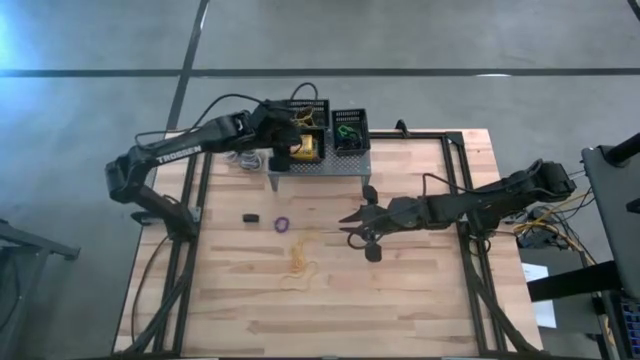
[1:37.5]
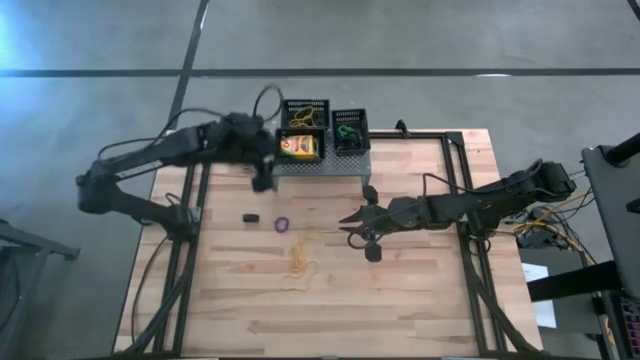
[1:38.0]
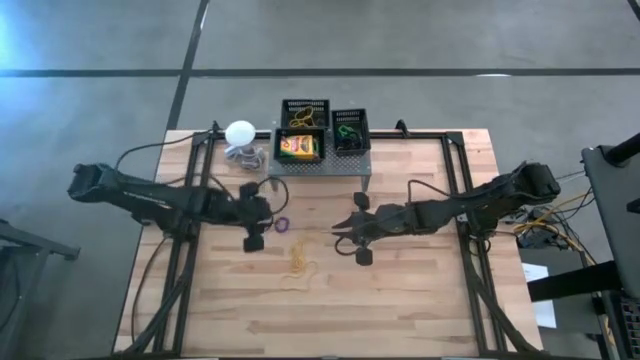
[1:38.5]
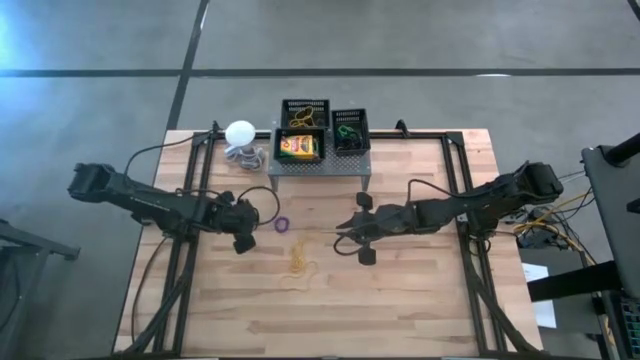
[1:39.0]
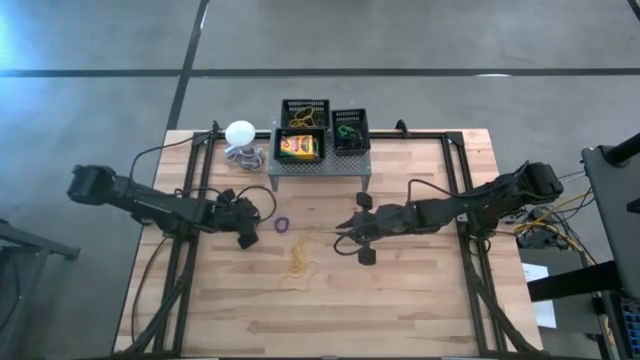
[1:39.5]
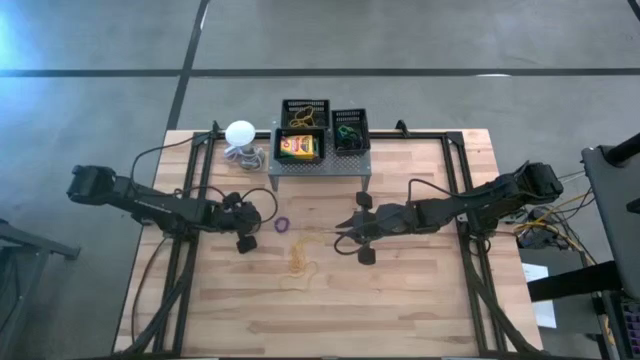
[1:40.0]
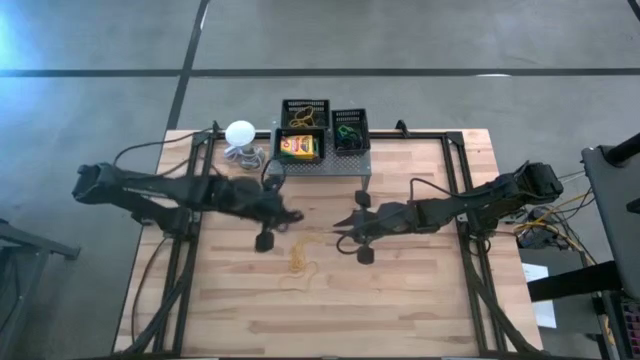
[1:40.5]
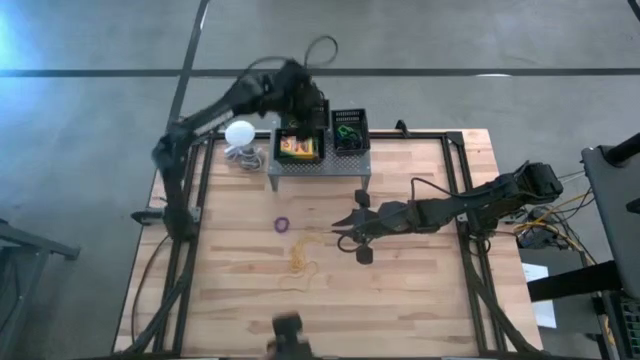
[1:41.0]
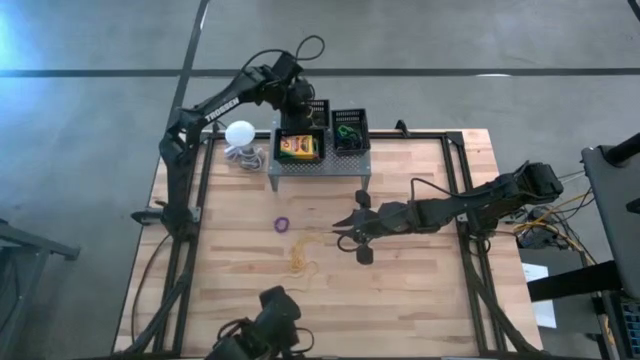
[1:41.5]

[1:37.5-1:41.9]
Task: Pick & Place Office Desk Supplies
Put the black rubber band into the top left black bin on the shelf

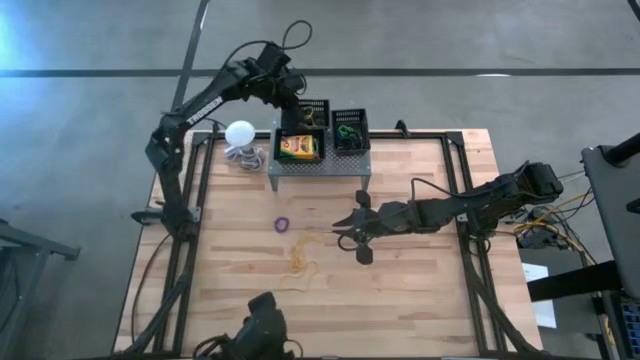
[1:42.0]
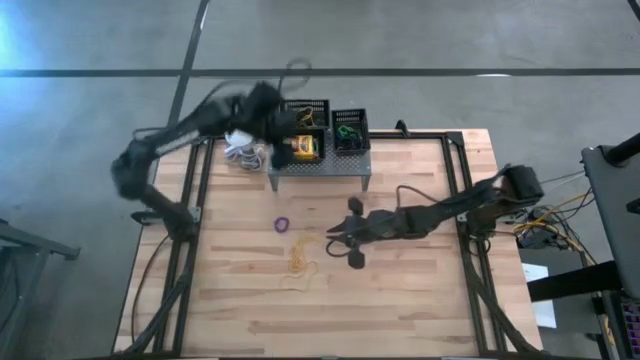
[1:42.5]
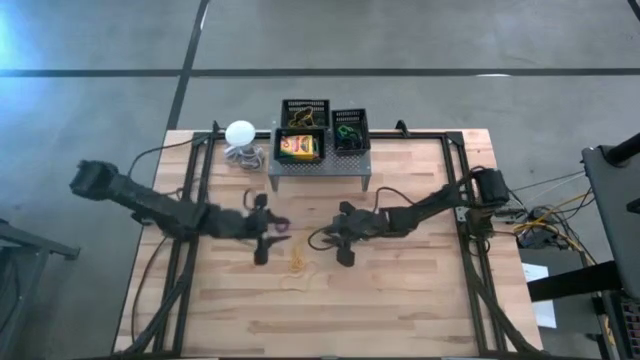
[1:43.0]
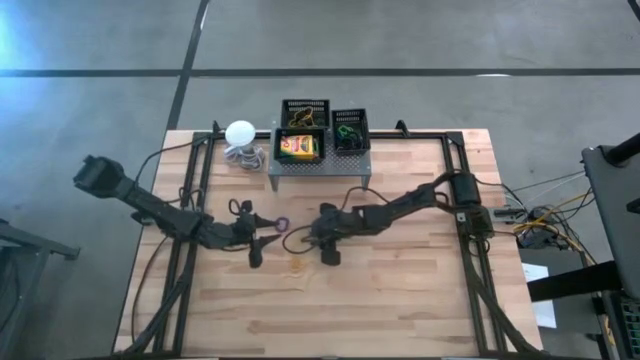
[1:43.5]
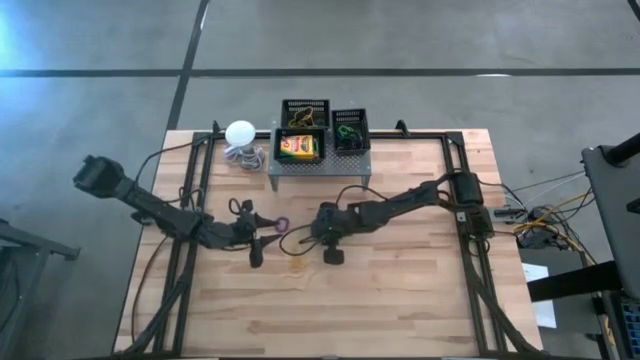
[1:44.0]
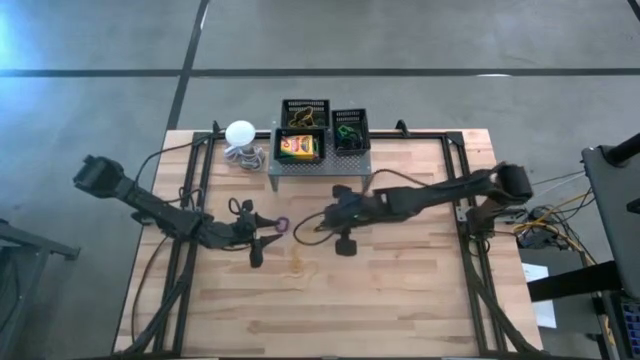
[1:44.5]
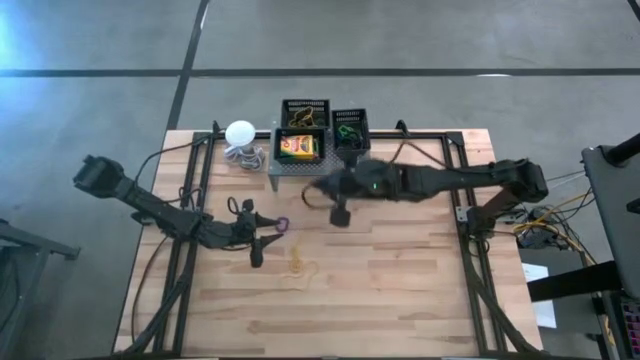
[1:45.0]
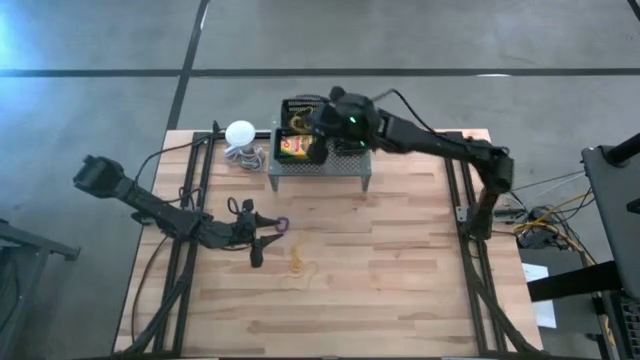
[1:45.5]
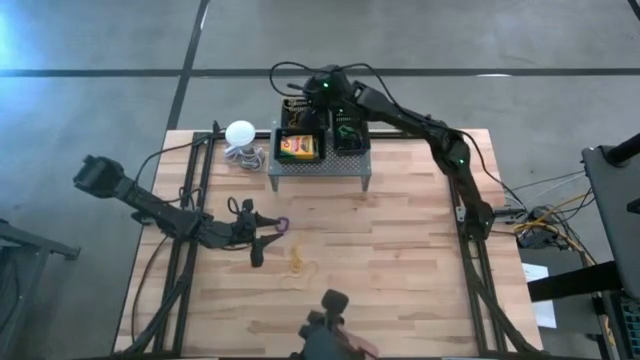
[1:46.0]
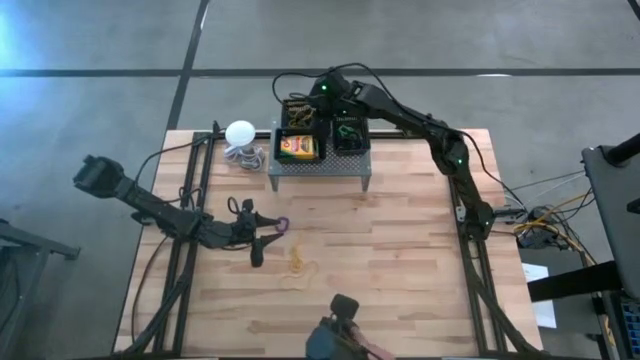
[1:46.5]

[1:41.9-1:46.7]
Put the yellow rubber band into the top left black bin on the shelf

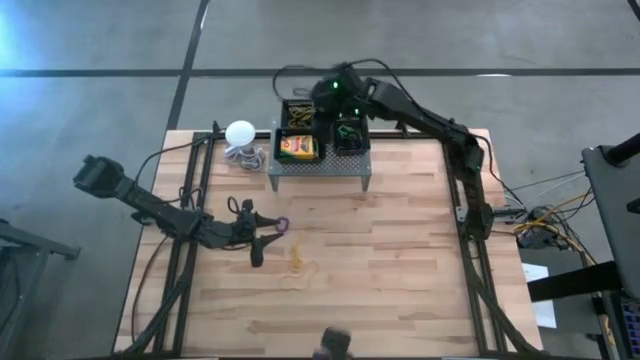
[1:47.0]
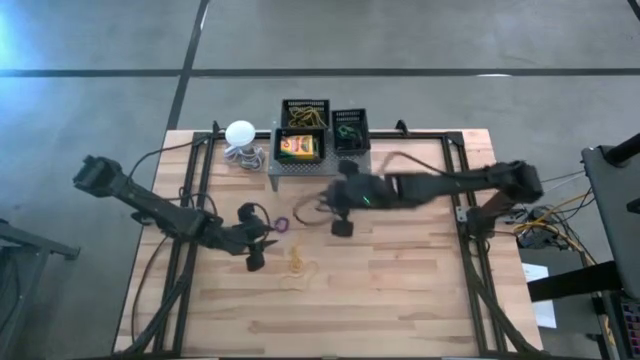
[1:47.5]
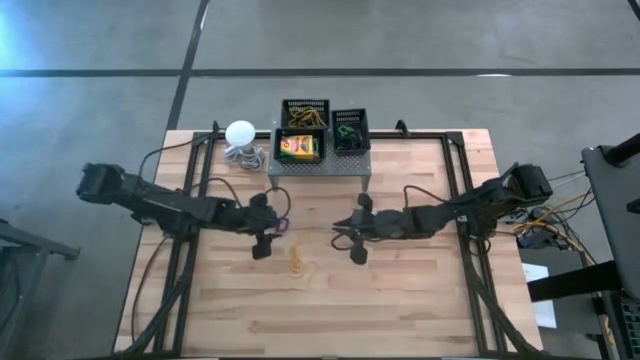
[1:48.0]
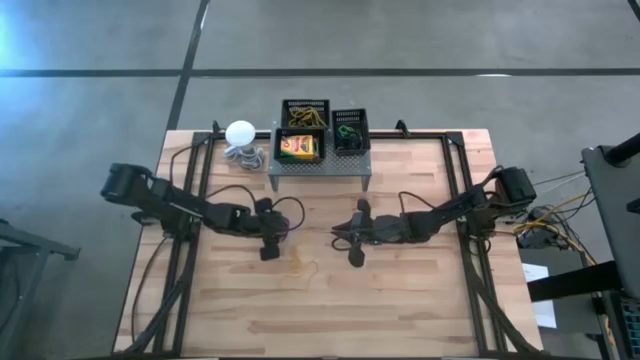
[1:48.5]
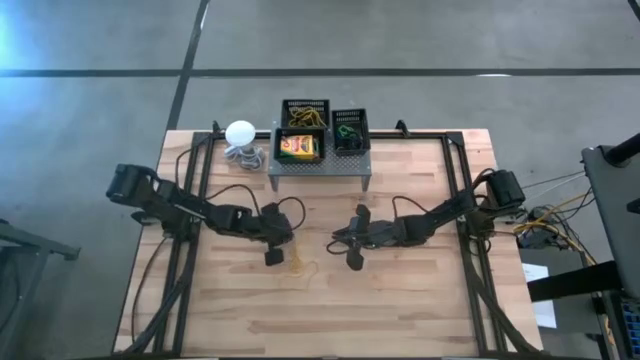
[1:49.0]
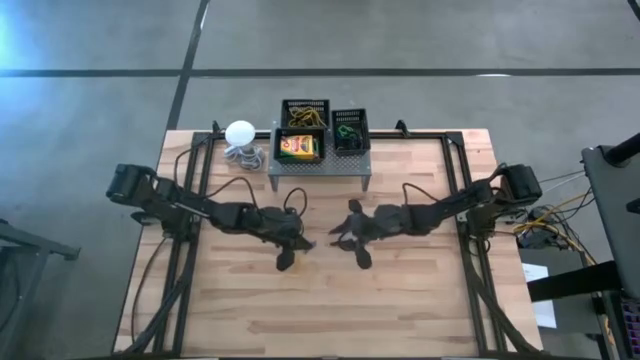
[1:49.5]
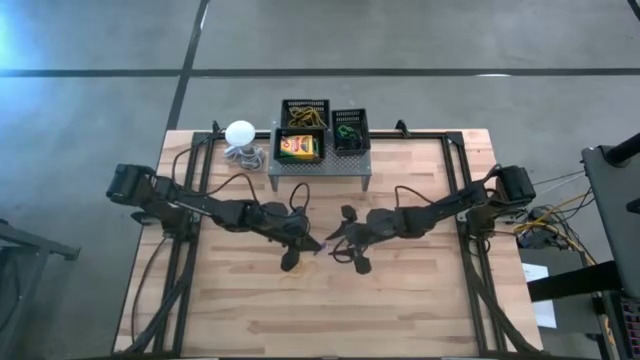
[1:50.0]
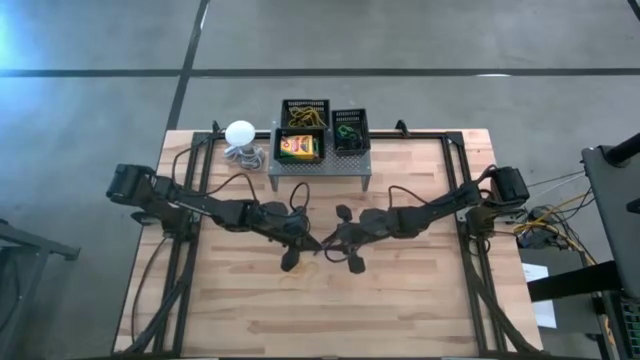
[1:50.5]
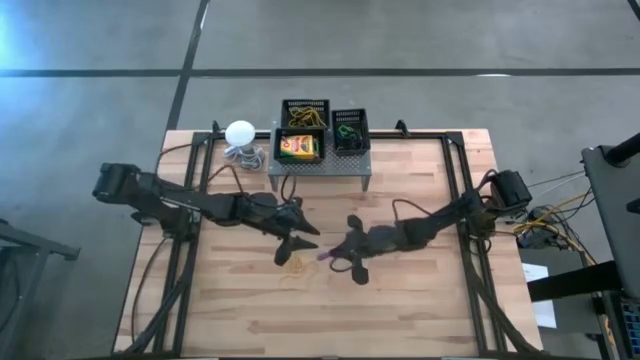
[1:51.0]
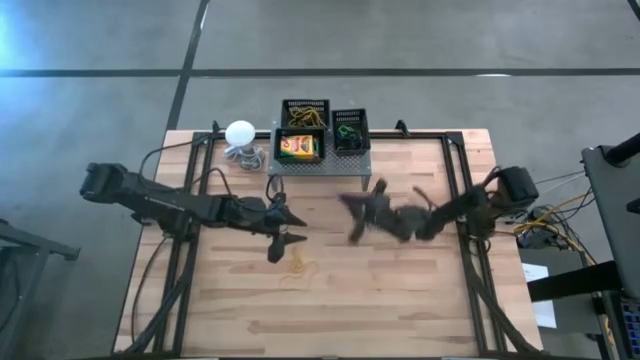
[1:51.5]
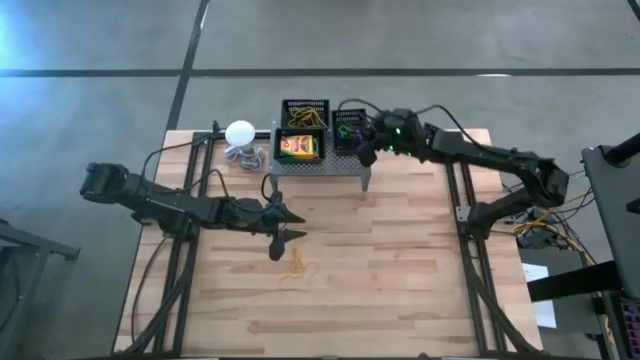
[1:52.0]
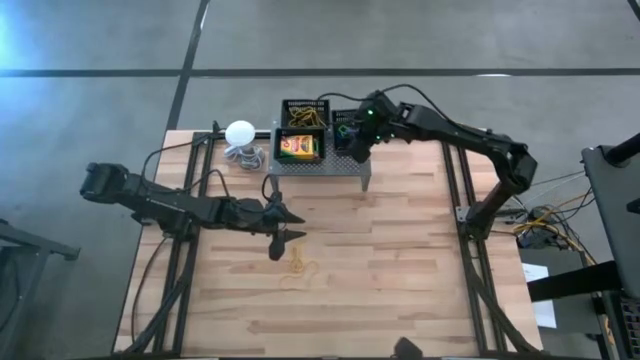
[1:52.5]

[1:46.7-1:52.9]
Put the purple spring keychain into the right black bin on the shelf

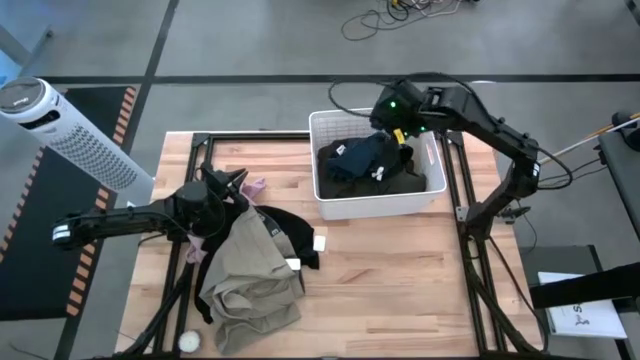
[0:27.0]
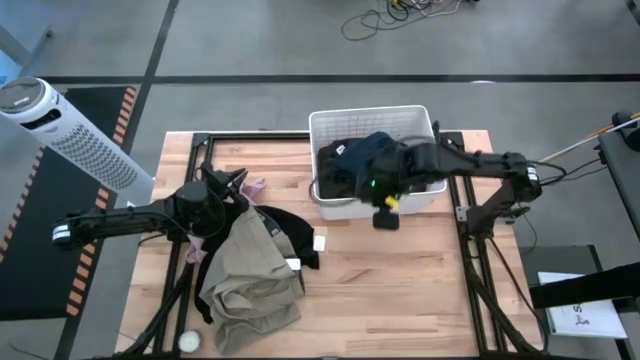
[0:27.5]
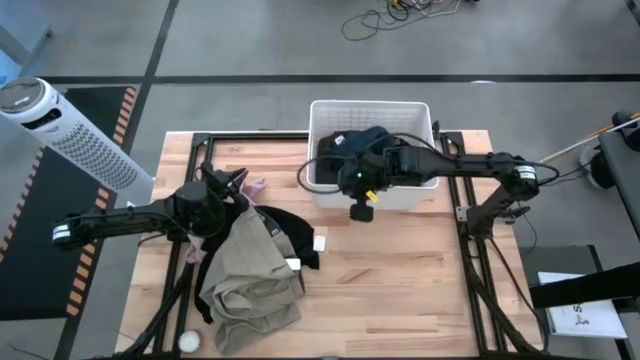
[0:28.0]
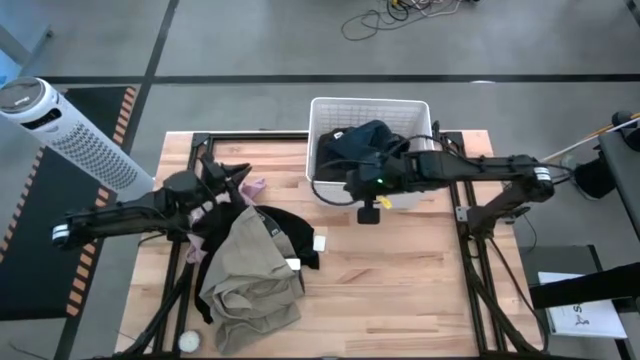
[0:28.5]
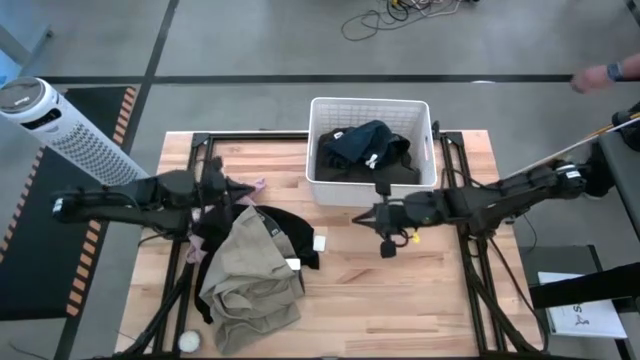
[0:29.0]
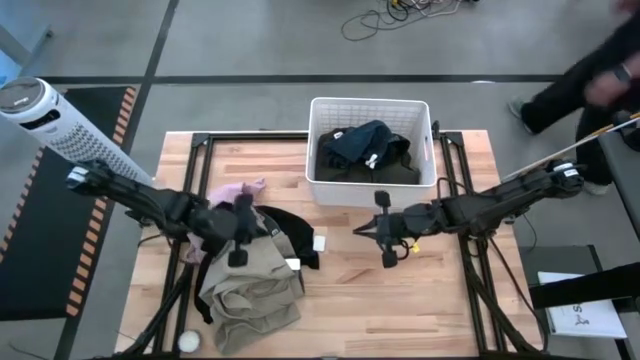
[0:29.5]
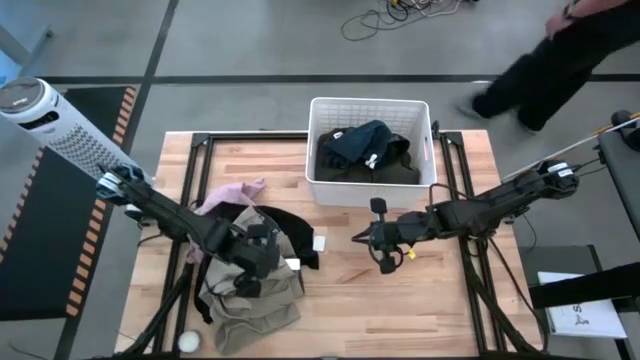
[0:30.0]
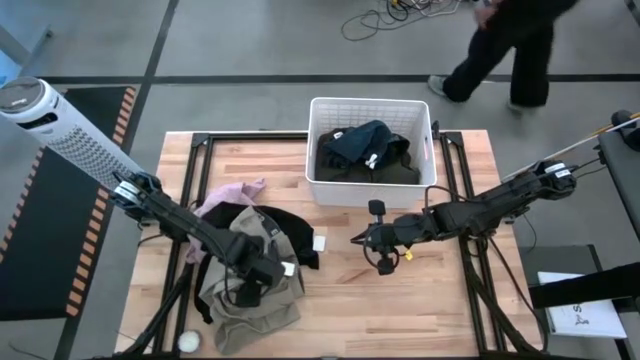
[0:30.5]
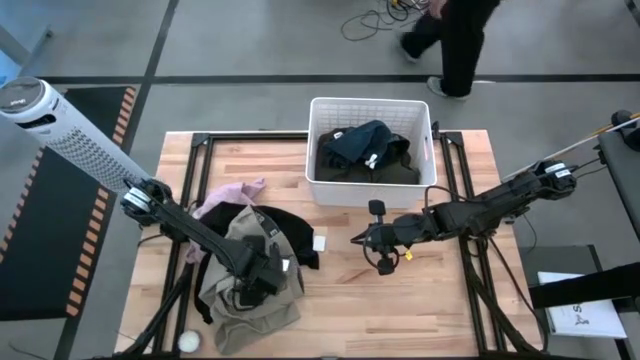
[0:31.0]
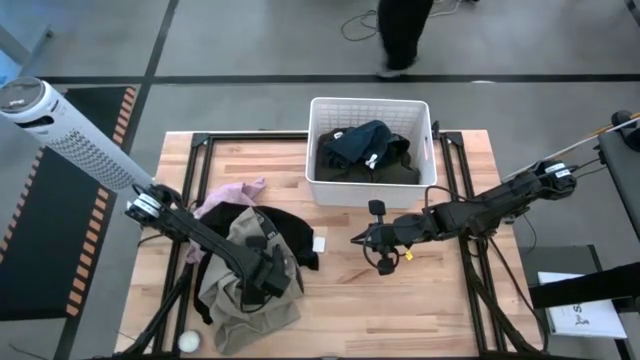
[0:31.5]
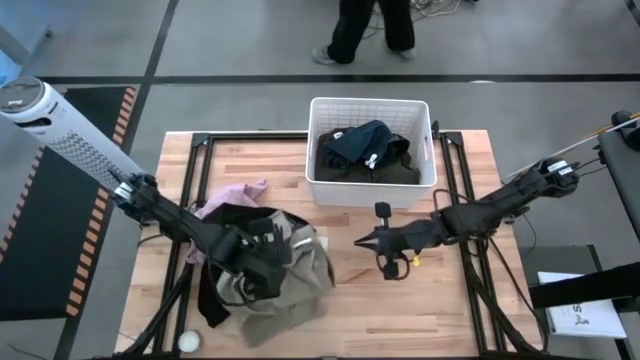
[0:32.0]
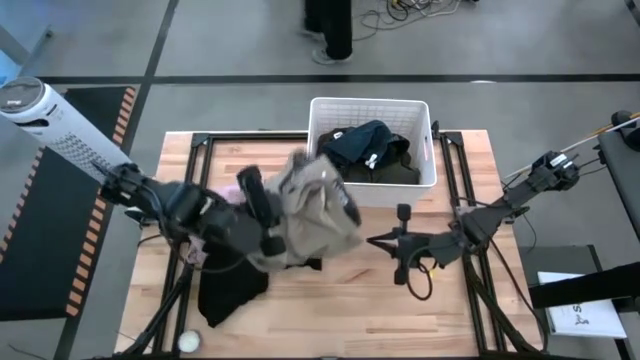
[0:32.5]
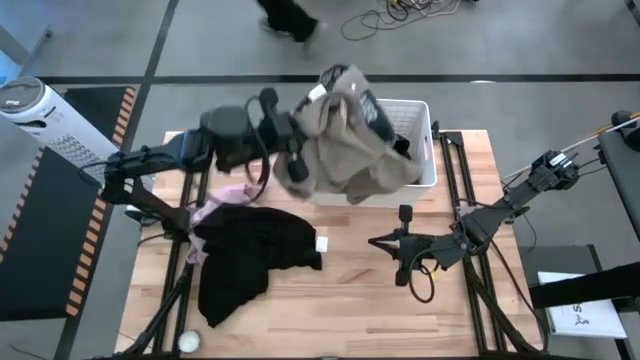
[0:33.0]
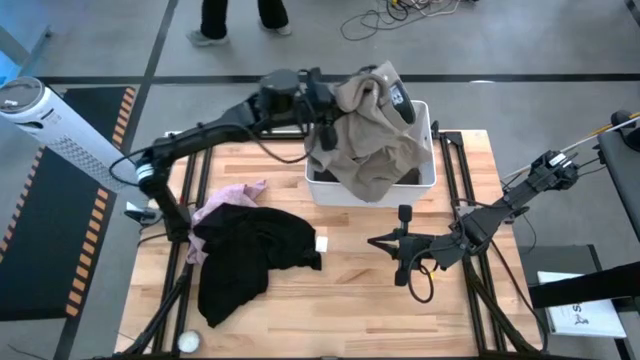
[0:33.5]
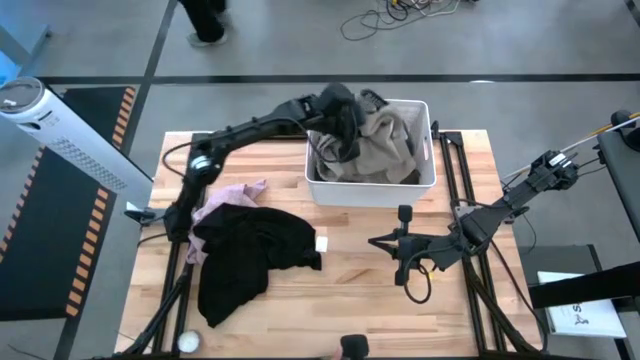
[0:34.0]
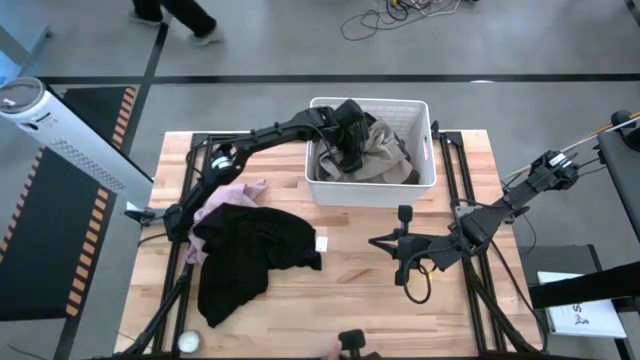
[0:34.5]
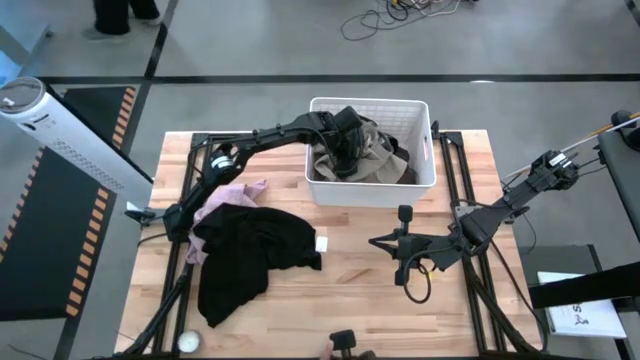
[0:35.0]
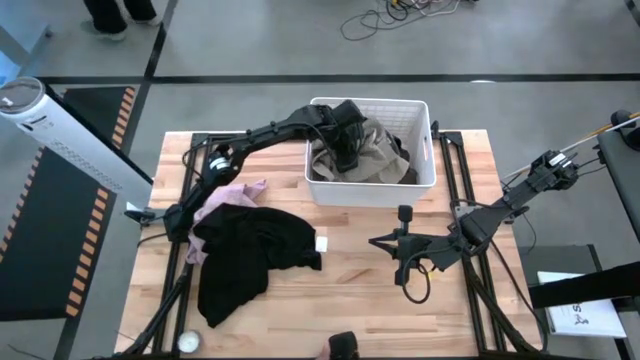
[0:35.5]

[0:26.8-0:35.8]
Task: Sort clothes
Put the light brown pants into the white laundry bin
